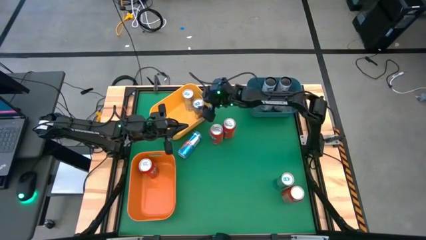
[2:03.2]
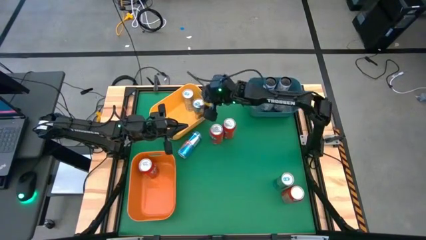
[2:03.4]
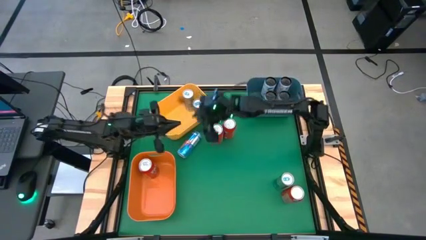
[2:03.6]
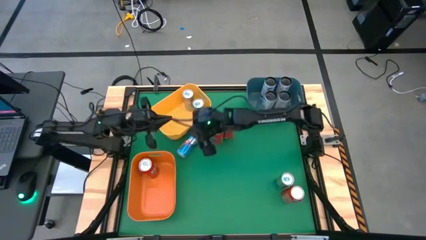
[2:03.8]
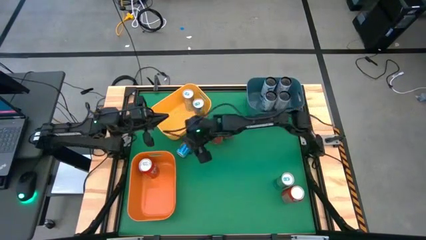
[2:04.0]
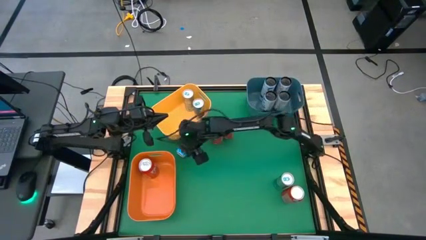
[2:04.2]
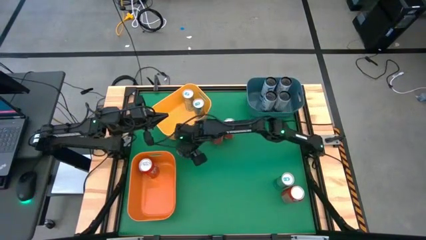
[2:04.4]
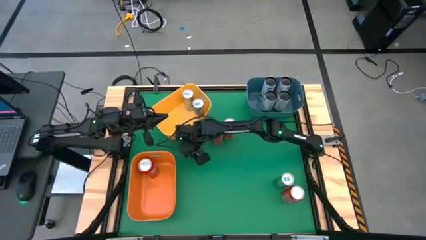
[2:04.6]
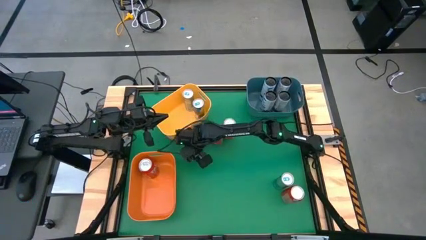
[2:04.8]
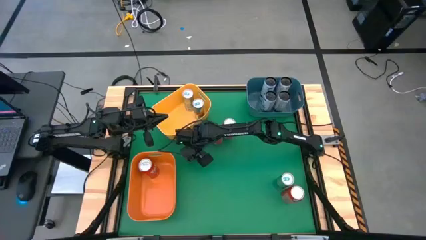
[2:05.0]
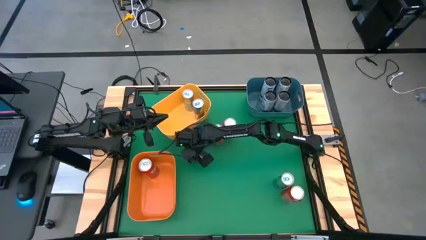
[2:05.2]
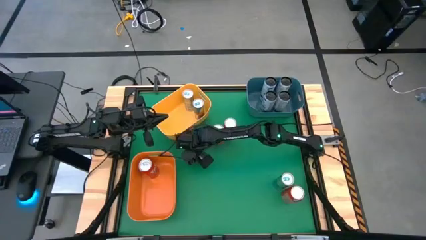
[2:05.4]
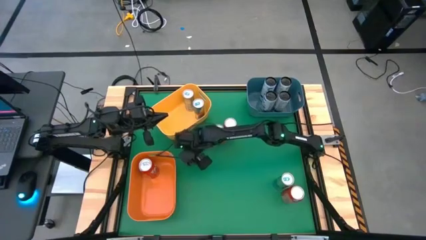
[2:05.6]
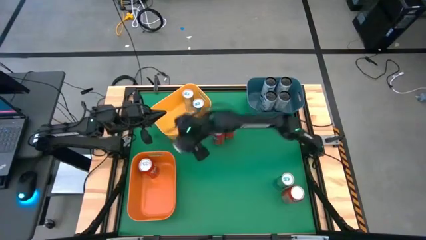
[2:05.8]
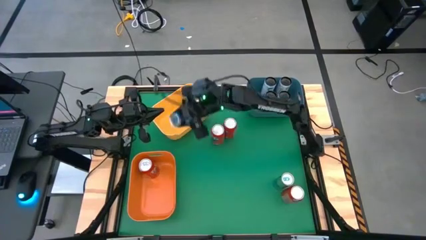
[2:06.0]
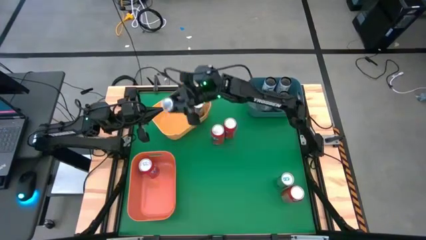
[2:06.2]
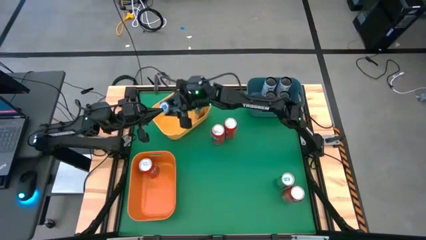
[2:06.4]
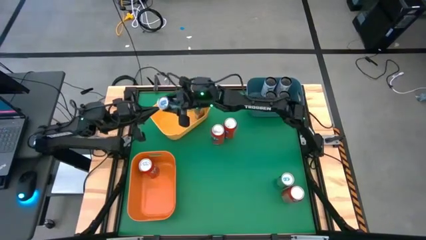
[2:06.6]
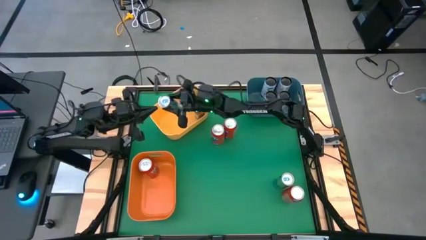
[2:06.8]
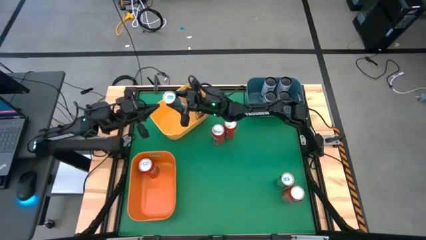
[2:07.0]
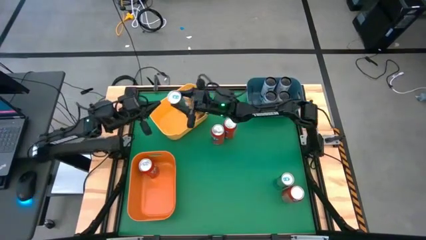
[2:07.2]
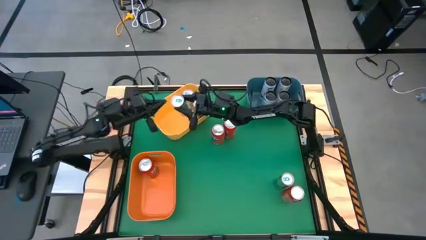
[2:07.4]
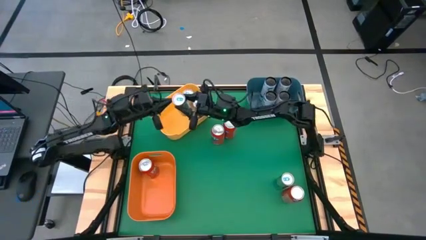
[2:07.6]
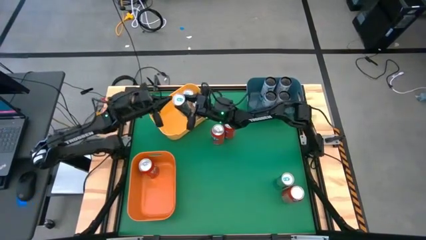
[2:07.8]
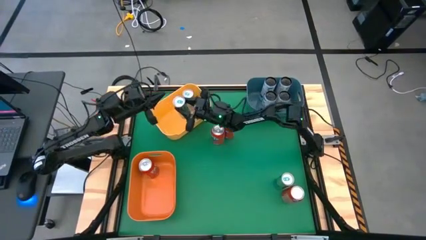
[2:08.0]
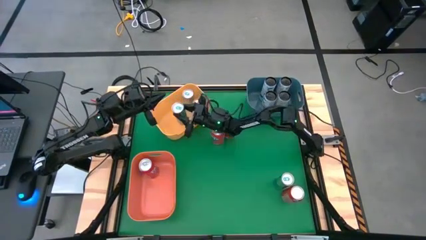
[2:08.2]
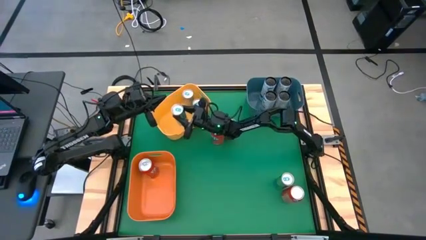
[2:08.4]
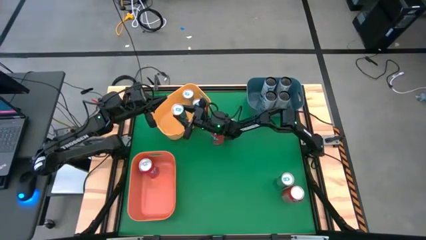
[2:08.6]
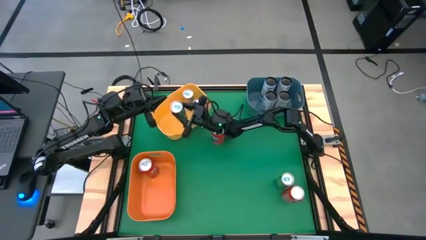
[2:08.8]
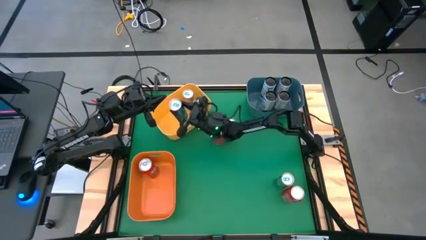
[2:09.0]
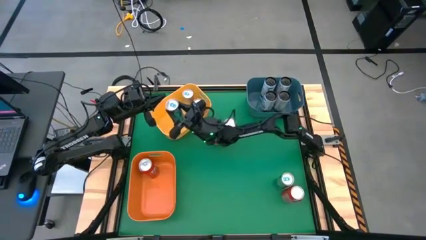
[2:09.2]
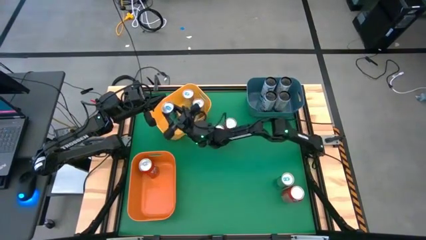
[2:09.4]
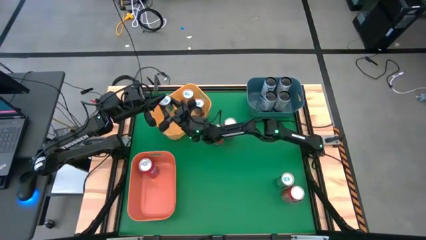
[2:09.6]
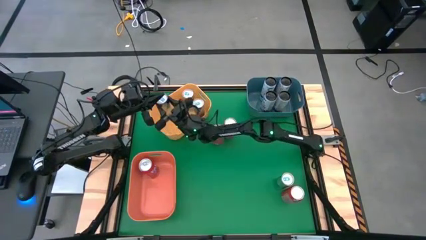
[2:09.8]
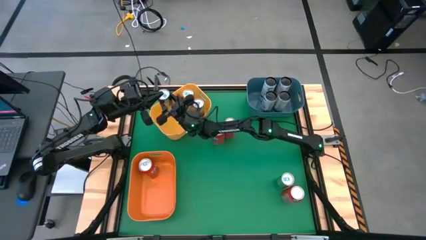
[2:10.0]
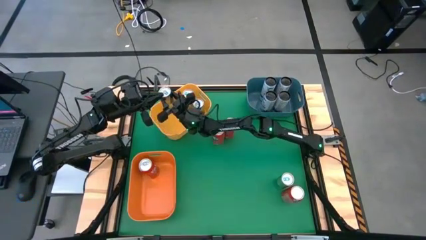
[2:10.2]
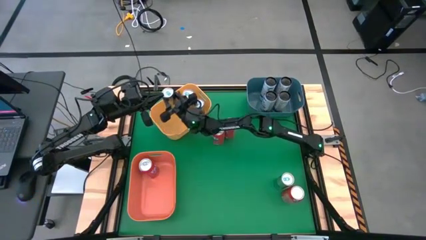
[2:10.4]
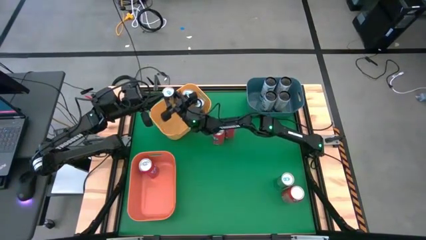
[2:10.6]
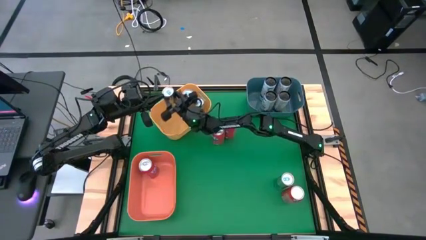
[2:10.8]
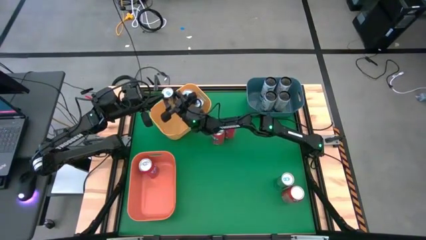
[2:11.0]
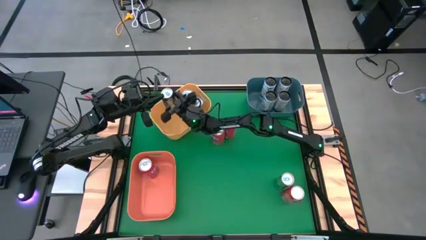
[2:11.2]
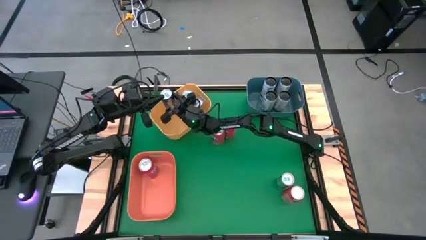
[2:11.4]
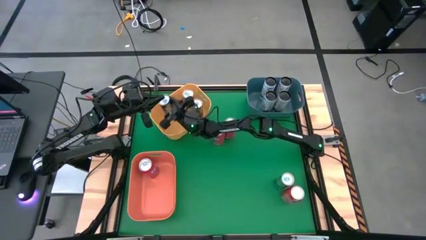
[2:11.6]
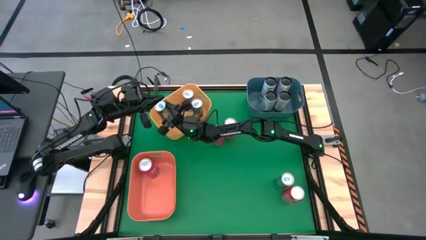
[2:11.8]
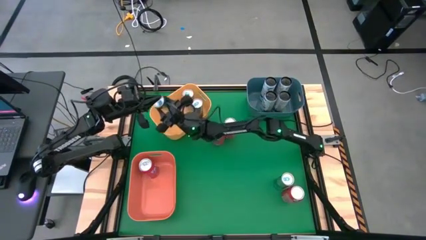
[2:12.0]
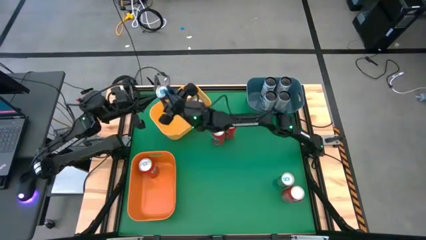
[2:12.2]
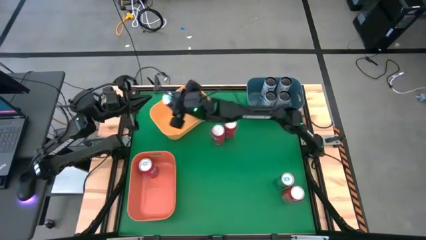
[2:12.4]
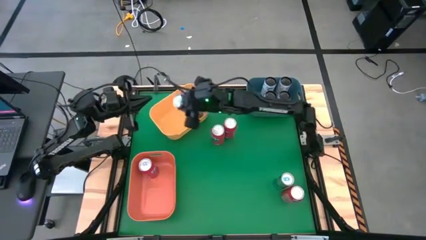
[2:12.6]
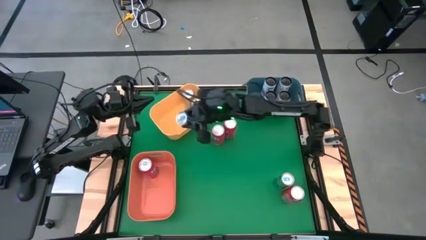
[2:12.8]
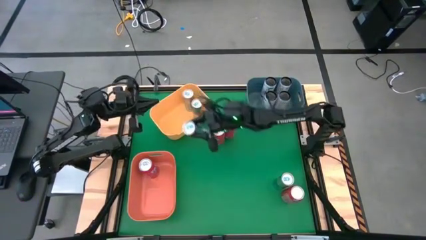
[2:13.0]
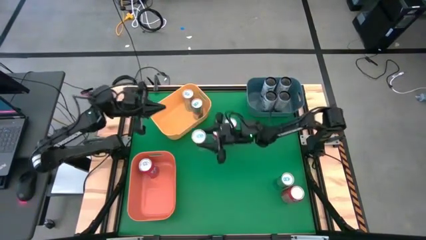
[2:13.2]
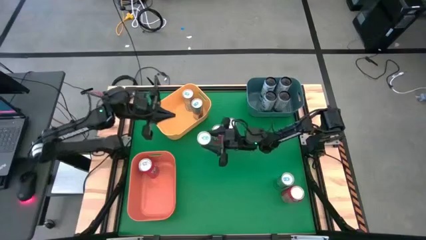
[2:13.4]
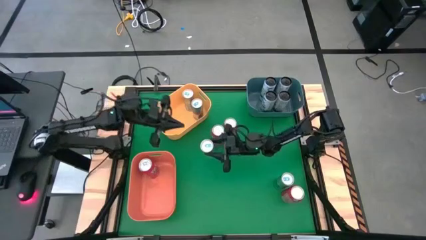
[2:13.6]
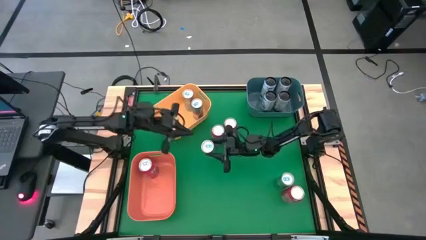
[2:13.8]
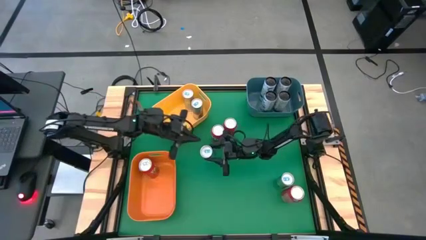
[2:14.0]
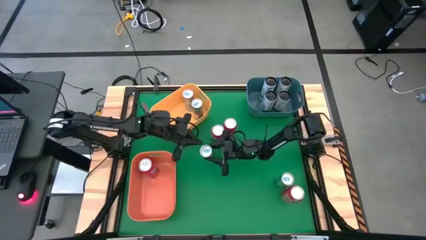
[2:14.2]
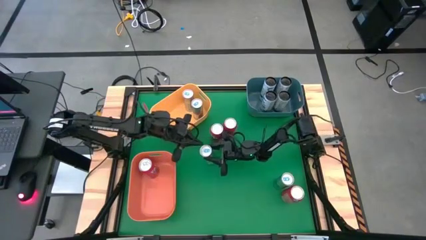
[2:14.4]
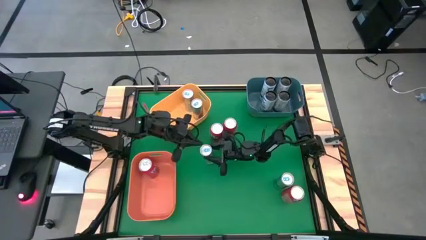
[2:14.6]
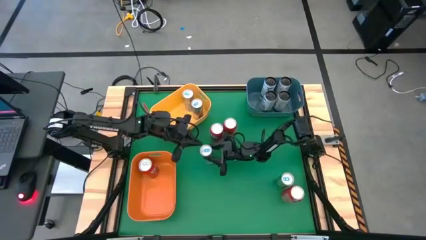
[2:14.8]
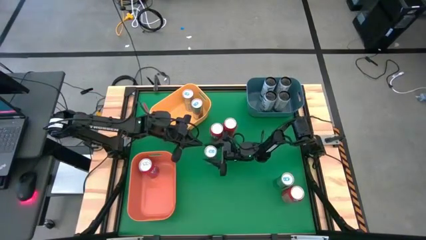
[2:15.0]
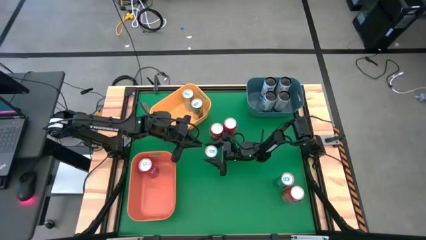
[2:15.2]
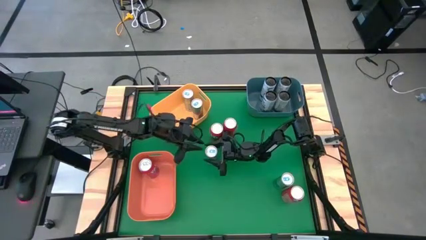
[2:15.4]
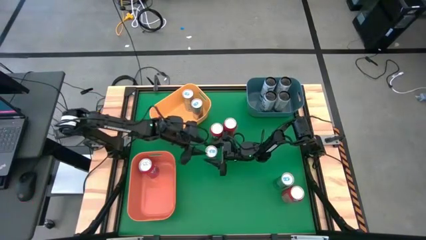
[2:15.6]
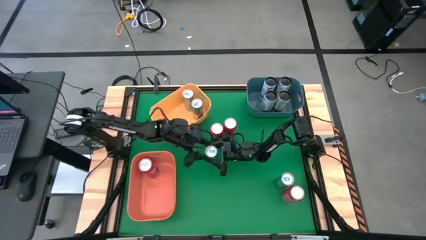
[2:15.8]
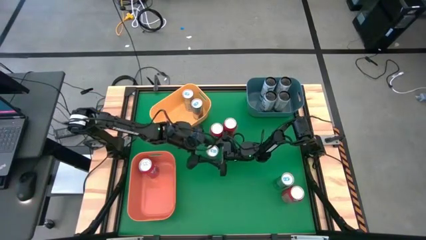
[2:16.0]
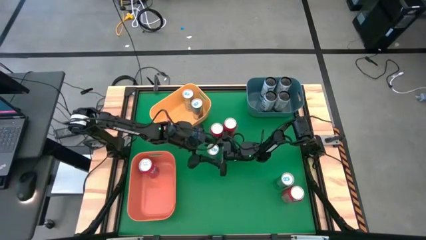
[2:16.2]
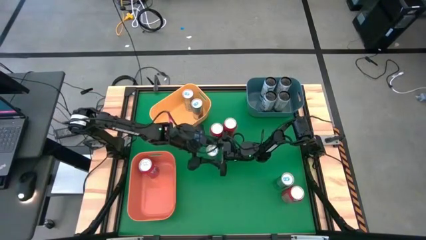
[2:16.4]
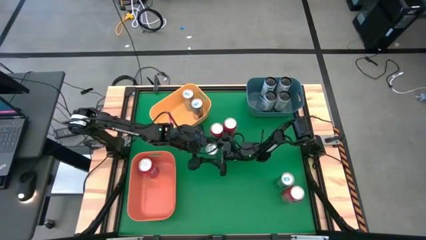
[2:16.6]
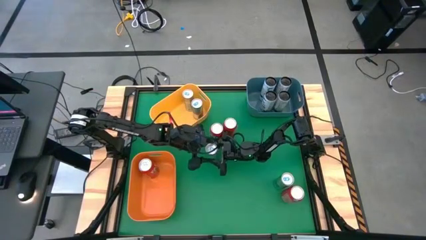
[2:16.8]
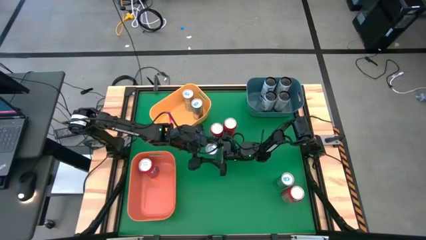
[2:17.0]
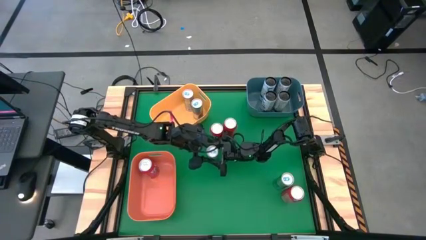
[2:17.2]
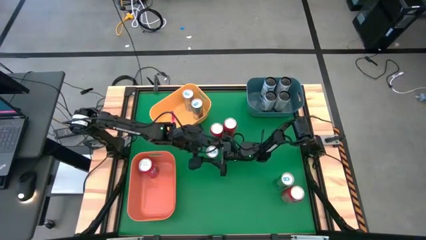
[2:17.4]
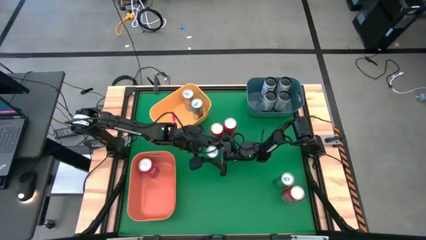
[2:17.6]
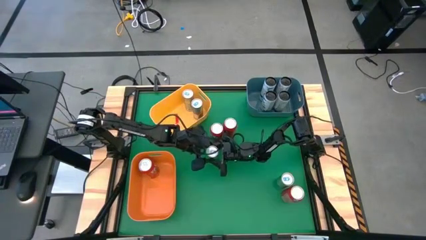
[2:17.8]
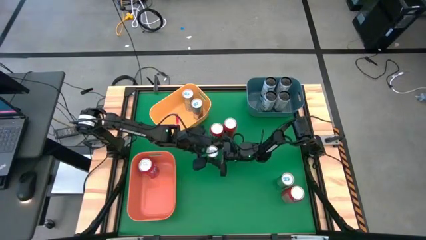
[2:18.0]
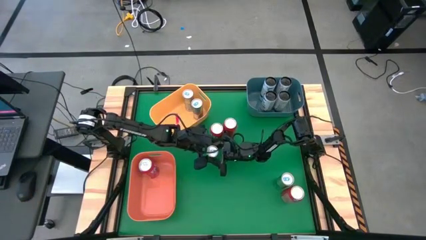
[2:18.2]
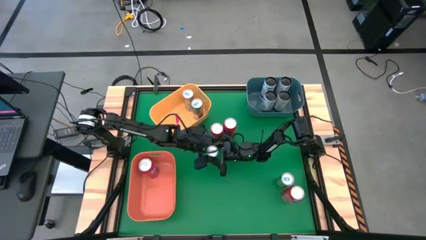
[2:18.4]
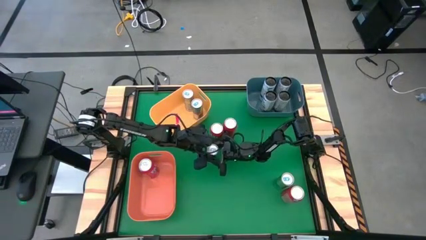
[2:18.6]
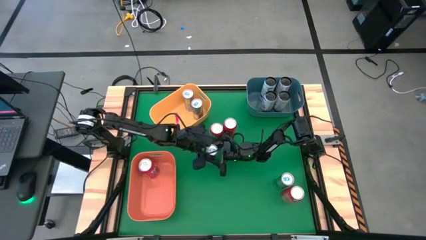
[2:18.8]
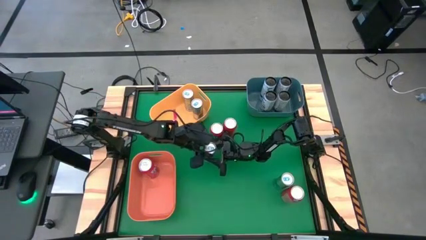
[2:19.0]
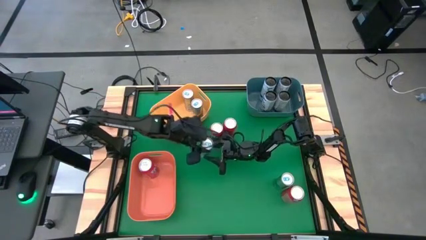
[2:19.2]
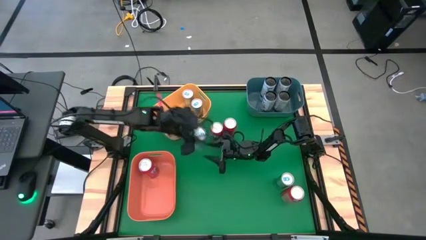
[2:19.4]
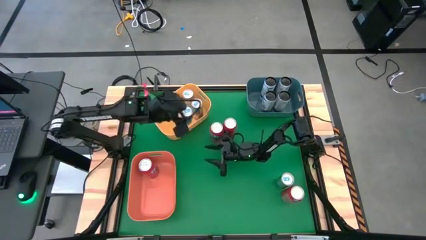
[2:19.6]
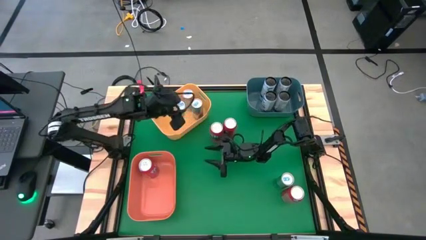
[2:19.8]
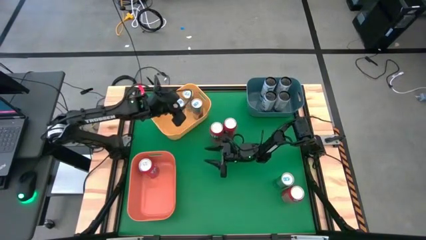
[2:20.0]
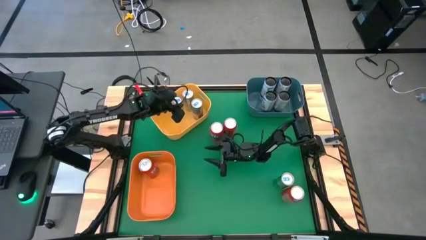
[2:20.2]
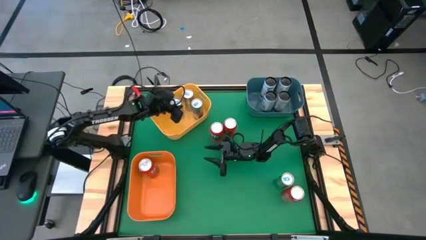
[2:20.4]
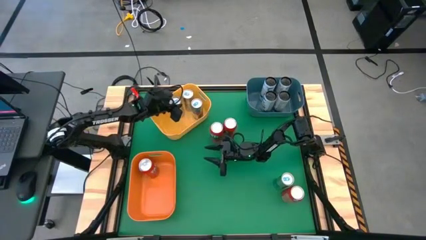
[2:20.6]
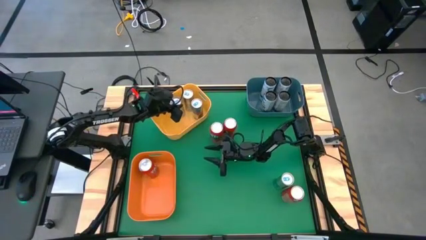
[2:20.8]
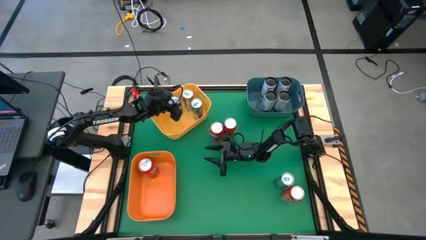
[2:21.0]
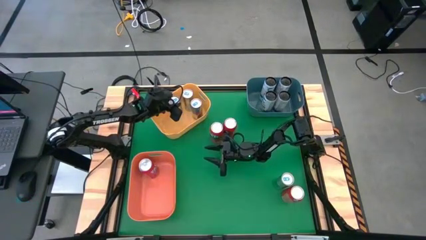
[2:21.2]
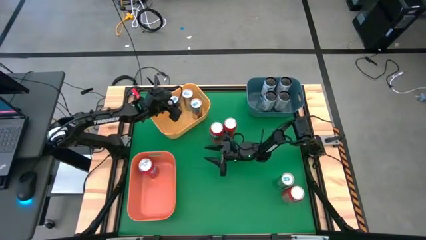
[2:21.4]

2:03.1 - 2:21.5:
Task: Sort soda cans
Put the blue soda can into the yellow bin
